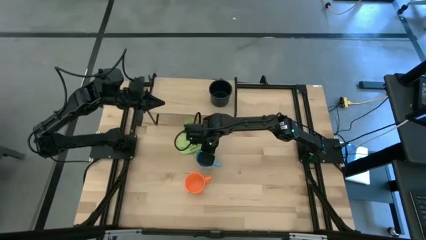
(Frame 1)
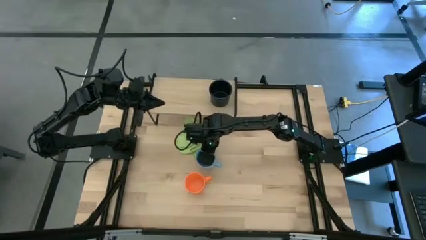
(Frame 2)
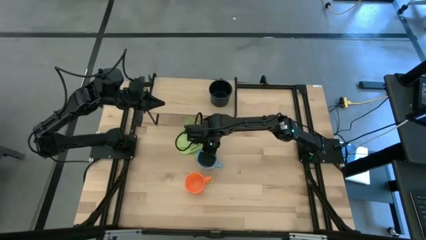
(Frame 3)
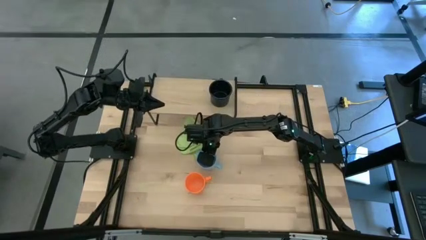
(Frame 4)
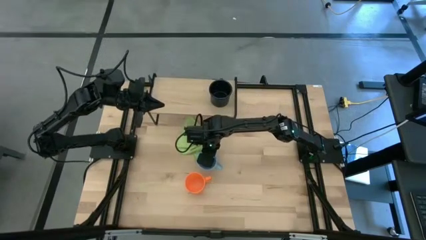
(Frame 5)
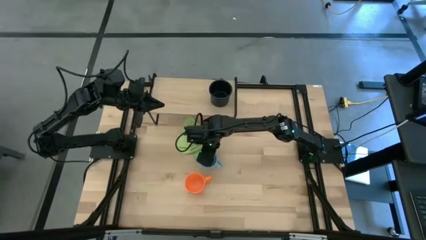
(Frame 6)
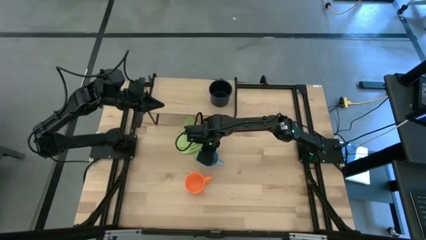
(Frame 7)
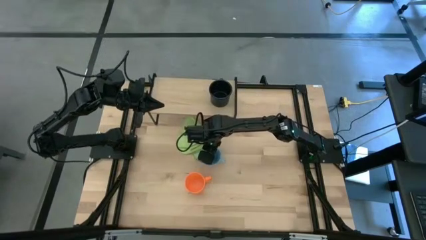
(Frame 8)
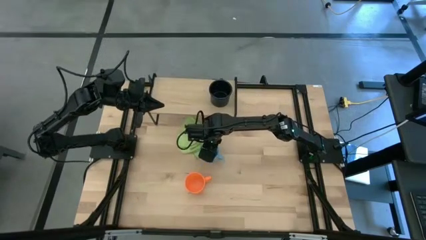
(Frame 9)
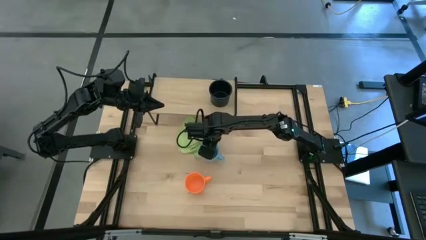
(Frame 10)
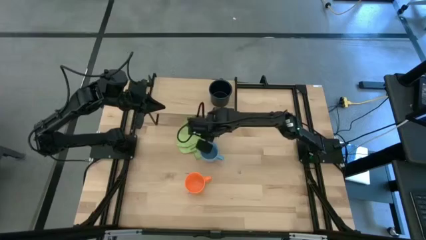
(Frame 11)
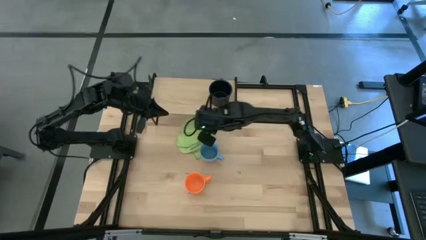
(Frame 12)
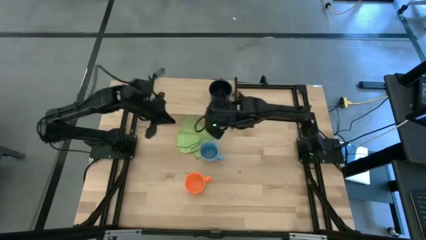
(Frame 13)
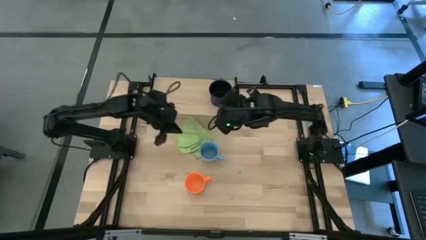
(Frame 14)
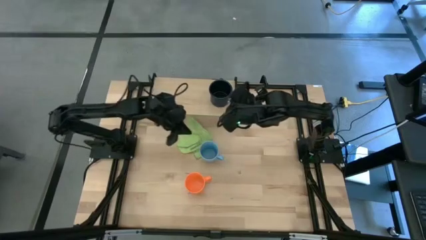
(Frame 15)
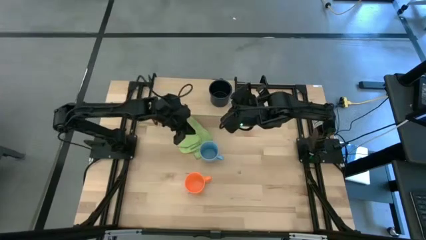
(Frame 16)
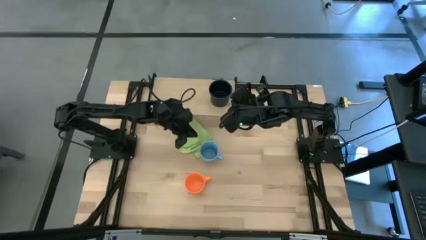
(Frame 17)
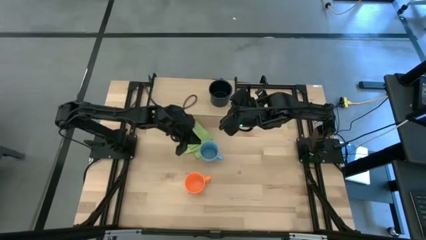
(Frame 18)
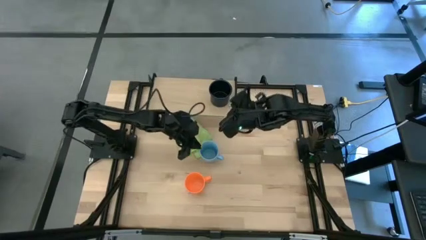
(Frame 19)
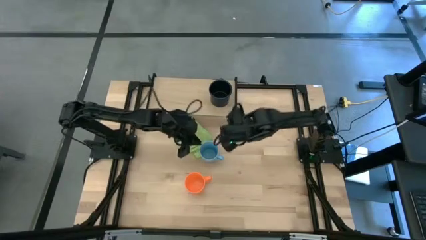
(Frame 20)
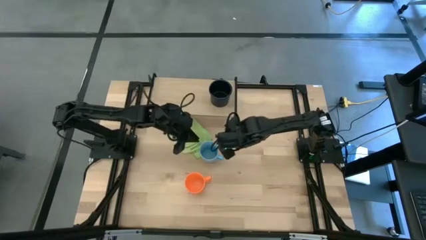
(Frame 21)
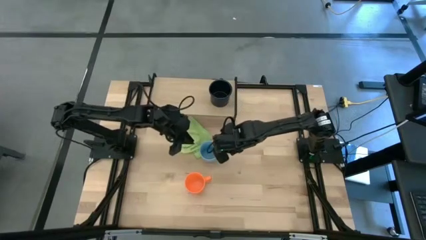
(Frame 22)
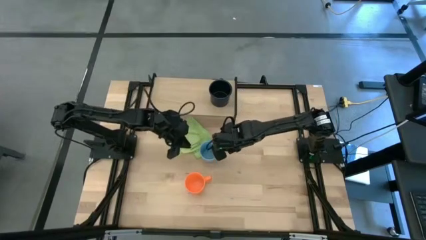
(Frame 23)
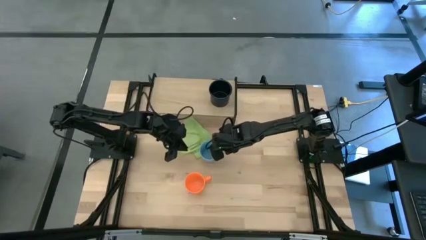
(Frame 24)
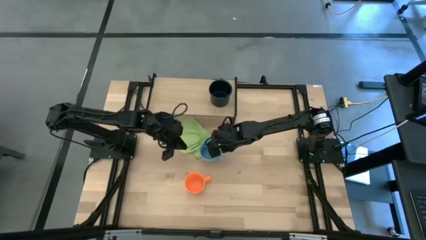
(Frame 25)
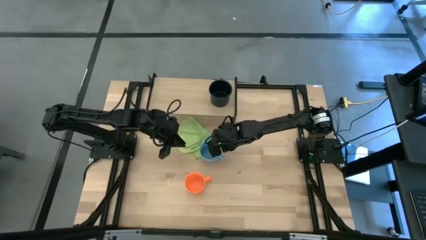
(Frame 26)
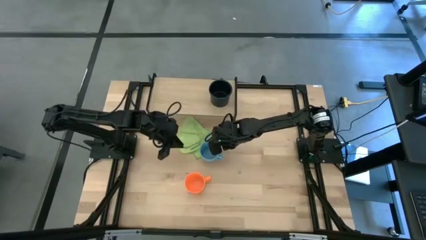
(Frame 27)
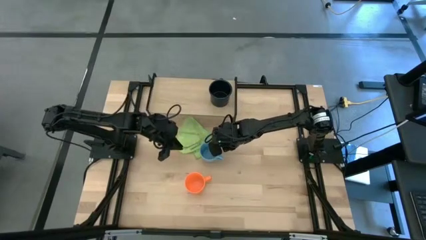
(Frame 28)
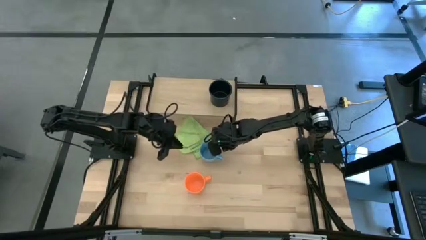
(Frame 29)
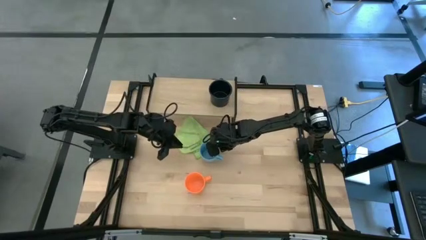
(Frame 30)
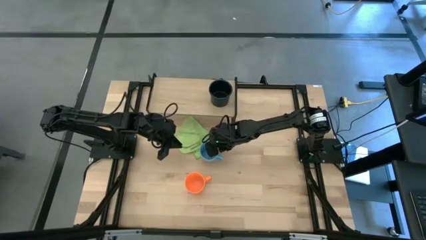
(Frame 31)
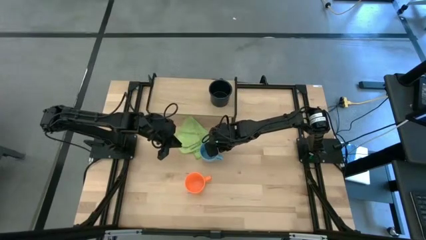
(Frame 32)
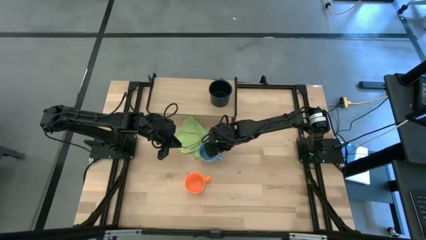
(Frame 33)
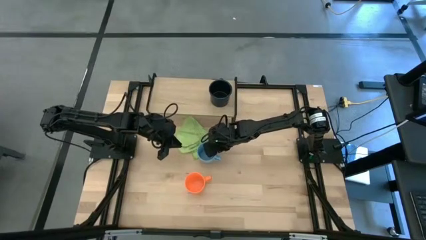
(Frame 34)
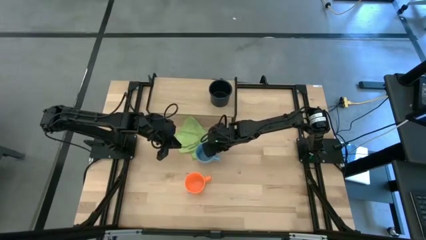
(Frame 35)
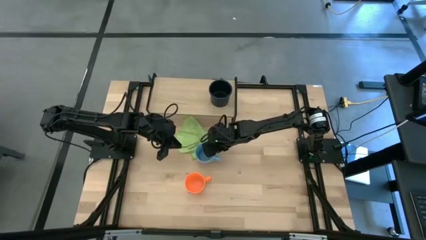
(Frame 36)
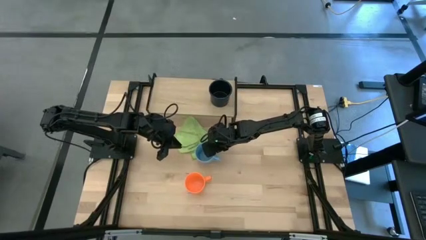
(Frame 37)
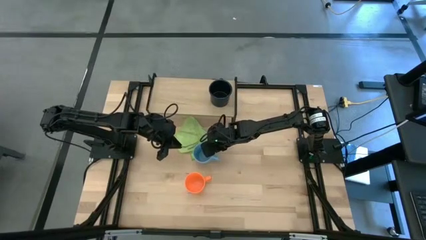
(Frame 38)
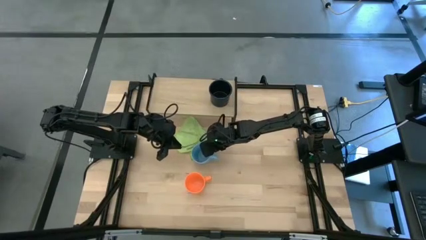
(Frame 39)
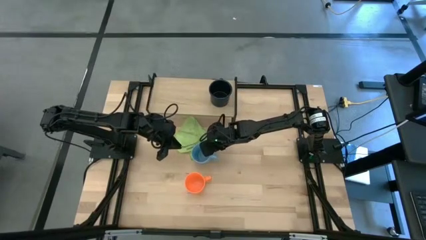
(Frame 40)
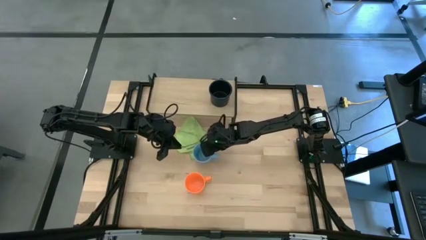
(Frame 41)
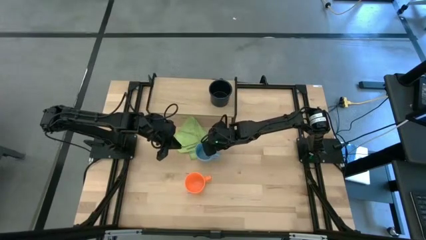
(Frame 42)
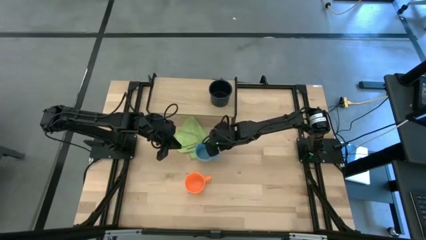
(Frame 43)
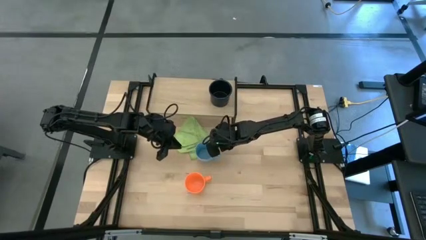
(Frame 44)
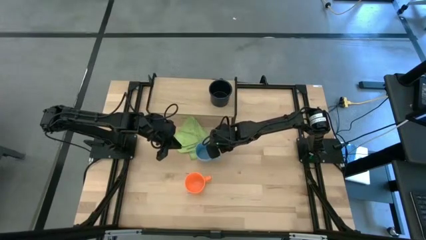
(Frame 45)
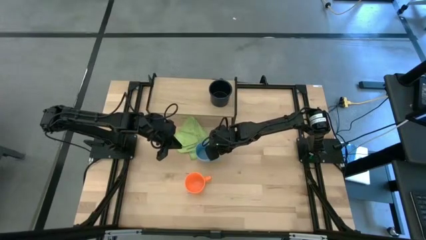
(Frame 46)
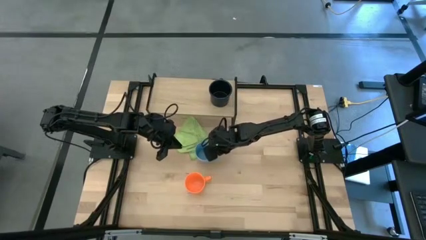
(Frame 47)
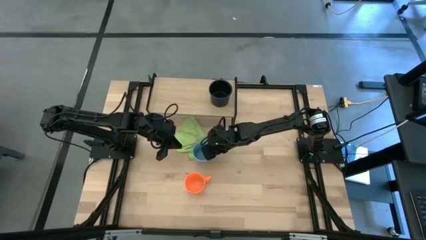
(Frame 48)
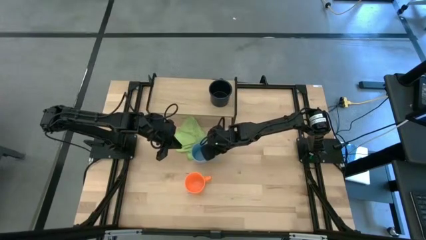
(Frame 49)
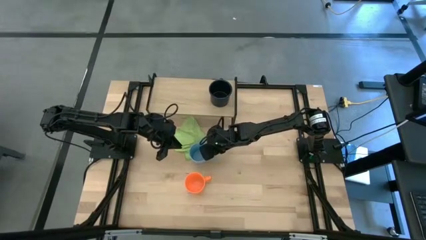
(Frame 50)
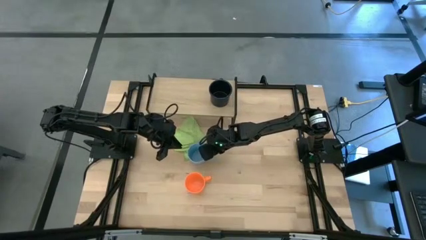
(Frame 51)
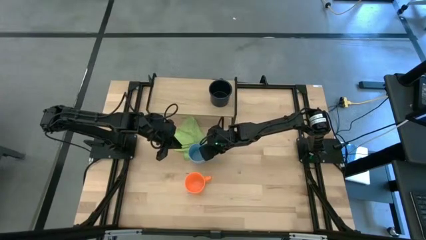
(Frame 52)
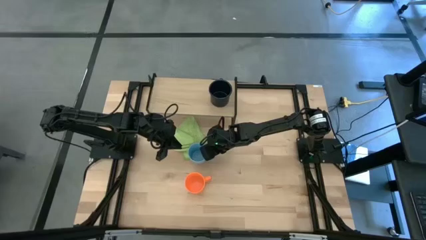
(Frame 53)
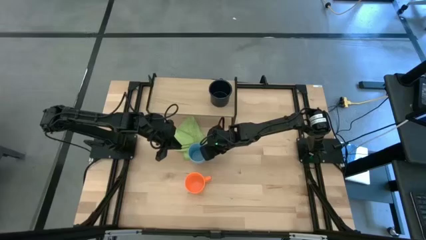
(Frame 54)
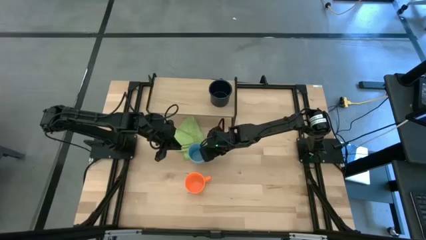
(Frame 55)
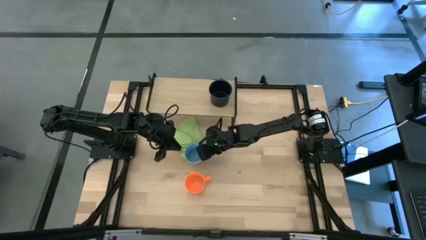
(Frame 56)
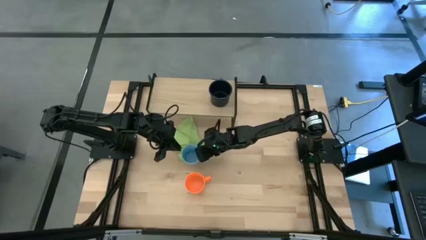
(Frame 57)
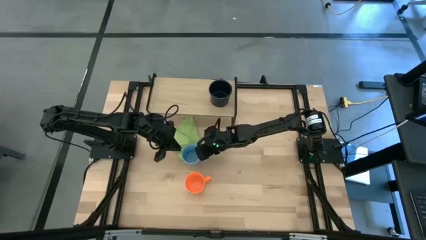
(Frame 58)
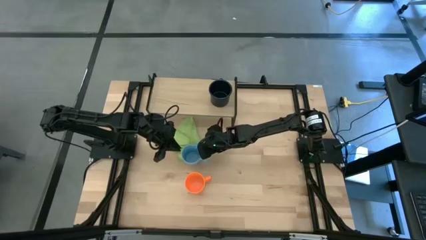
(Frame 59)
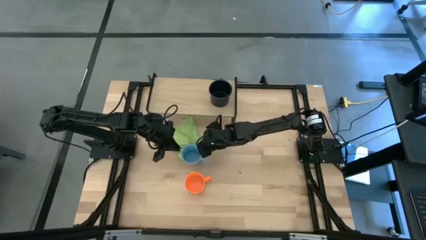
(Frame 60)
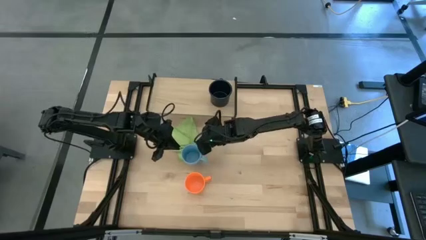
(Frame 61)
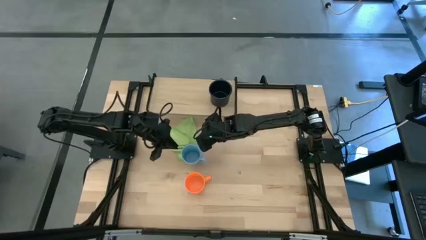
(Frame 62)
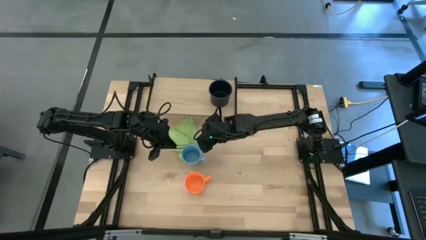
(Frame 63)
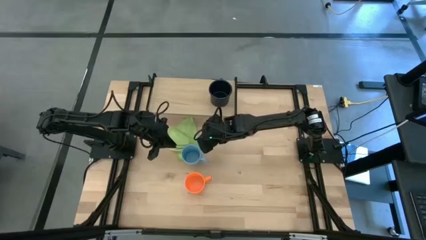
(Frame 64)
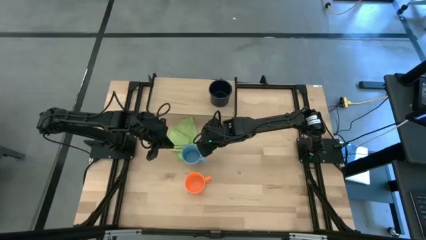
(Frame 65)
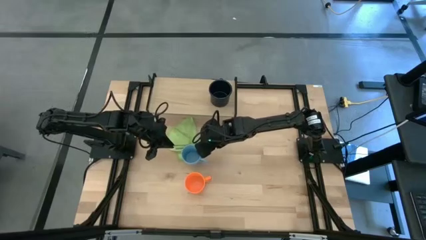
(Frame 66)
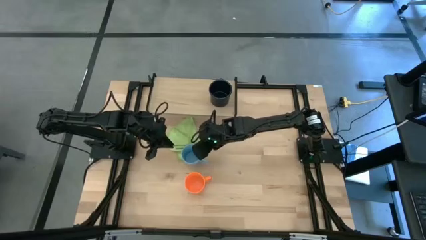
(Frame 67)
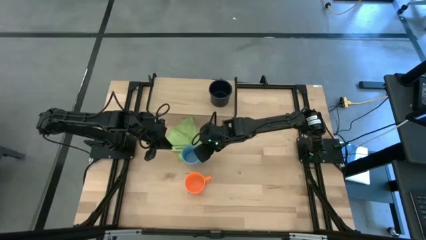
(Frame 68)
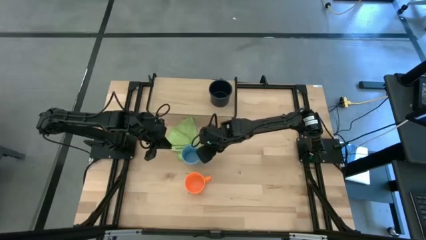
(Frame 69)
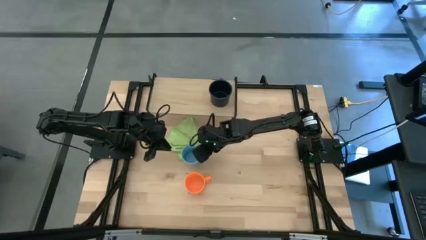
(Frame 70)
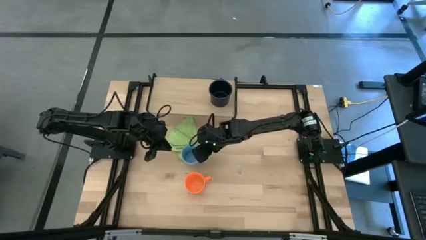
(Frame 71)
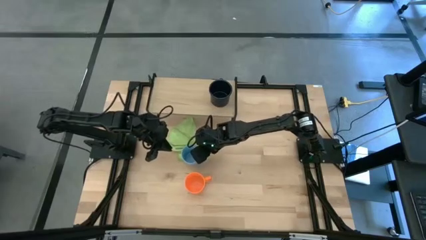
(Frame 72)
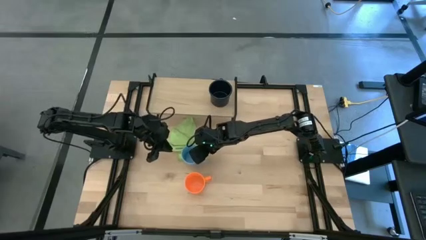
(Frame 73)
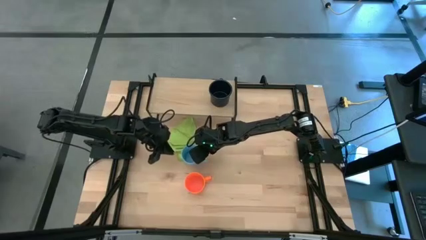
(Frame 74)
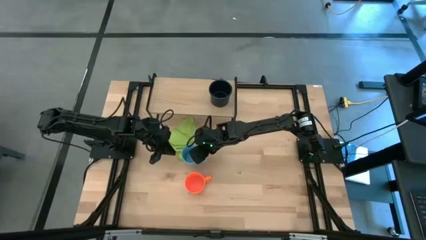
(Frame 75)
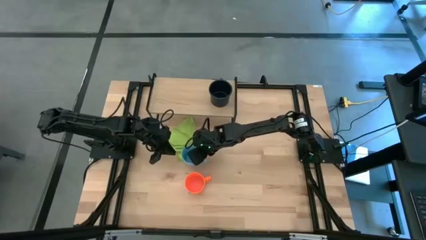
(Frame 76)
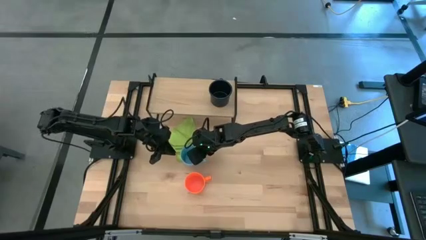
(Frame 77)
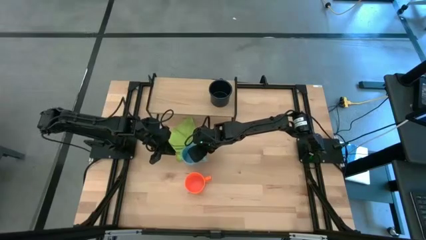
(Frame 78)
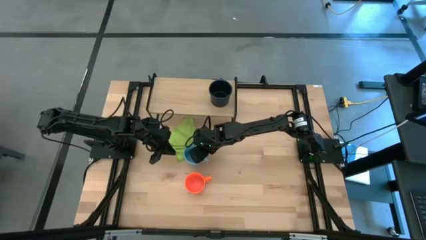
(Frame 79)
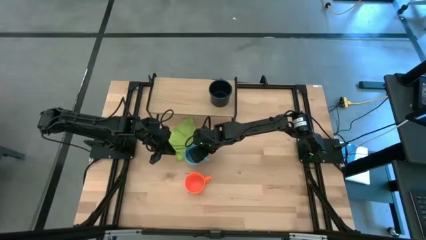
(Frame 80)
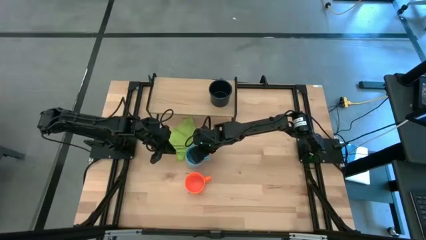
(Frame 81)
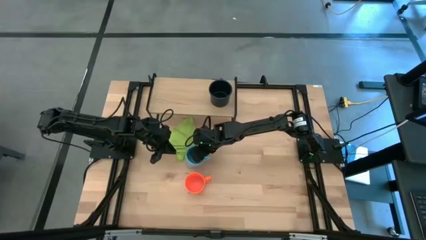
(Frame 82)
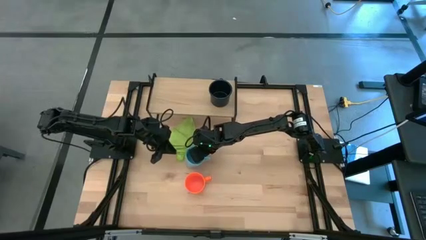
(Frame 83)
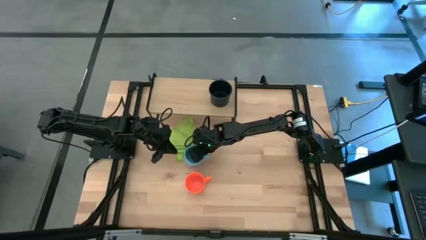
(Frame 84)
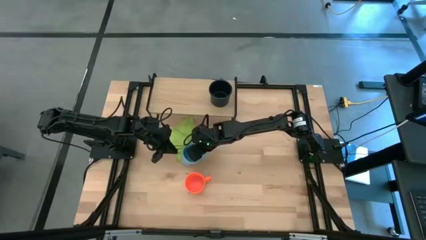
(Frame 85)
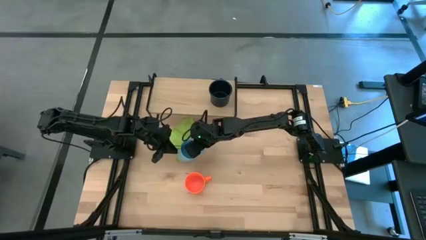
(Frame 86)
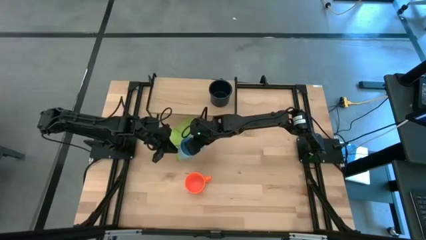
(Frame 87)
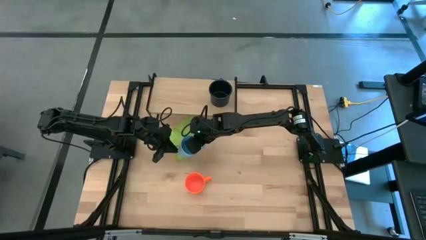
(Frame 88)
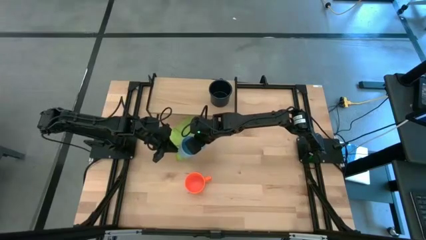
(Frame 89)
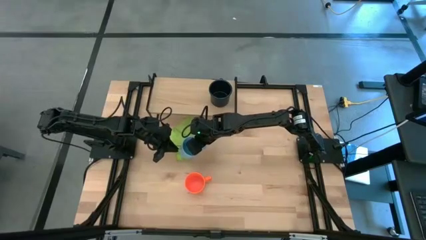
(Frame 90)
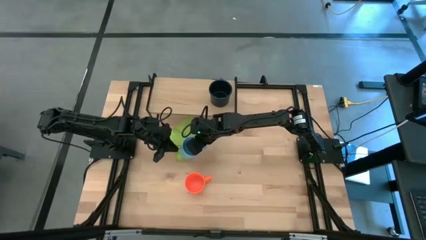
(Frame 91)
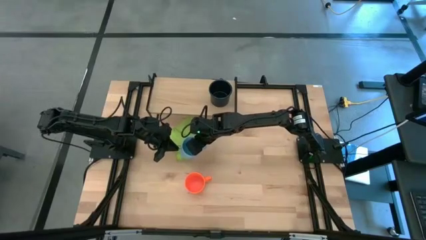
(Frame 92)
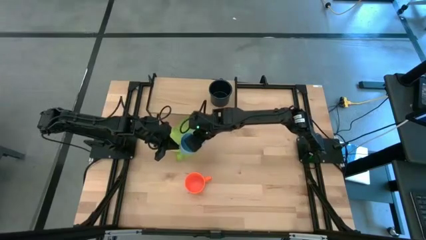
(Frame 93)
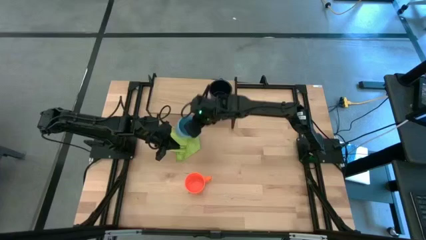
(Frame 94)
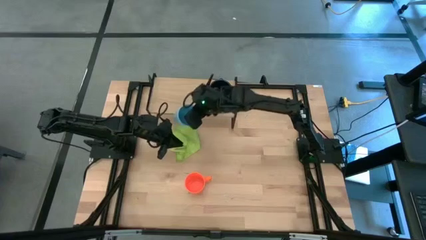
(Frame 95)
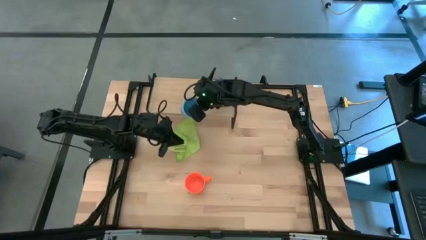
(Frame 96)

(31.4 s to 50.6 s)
Task: Stack small to large cups/mugs on shelf
Put the blue mug on the shelf
